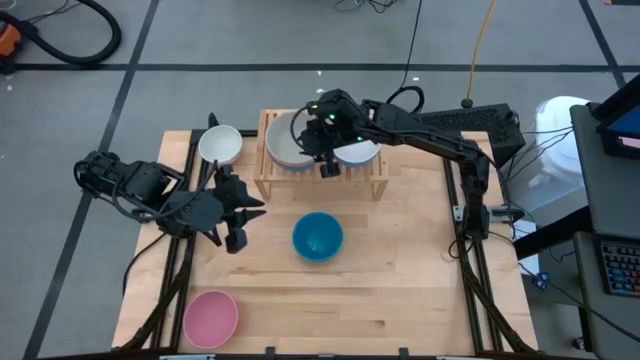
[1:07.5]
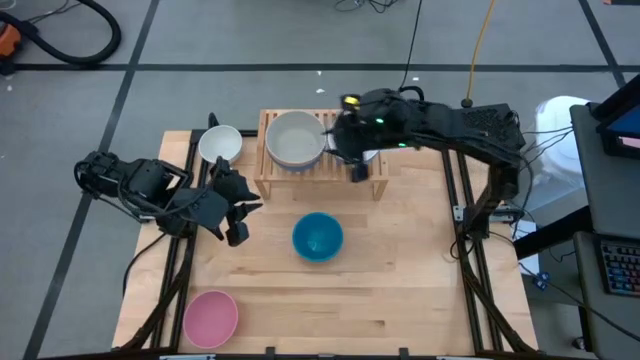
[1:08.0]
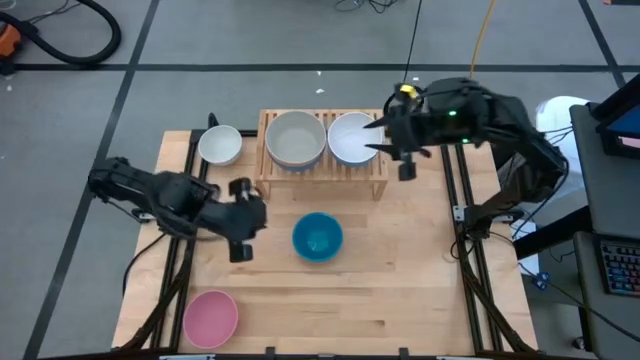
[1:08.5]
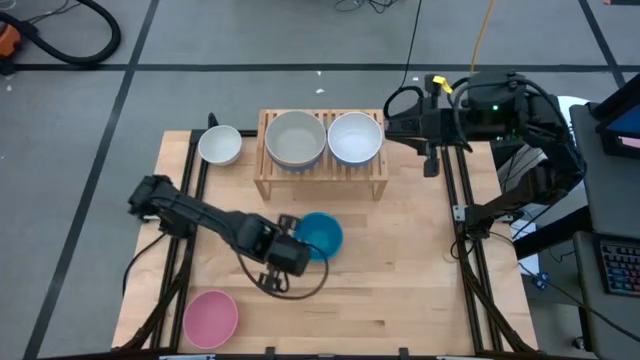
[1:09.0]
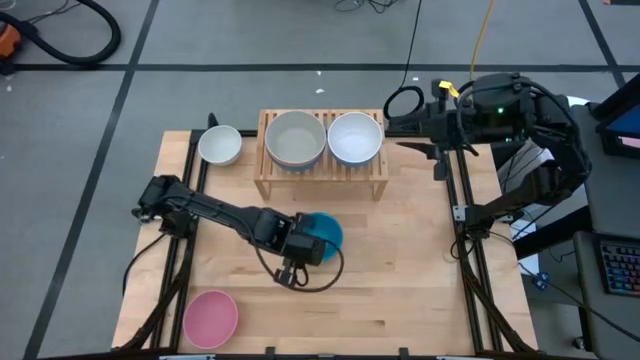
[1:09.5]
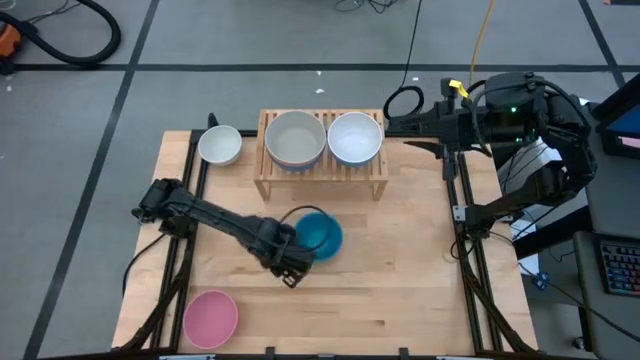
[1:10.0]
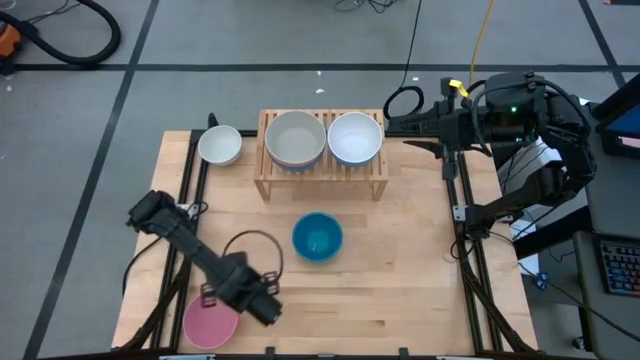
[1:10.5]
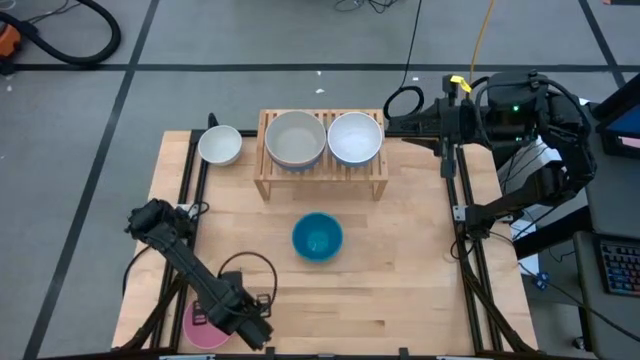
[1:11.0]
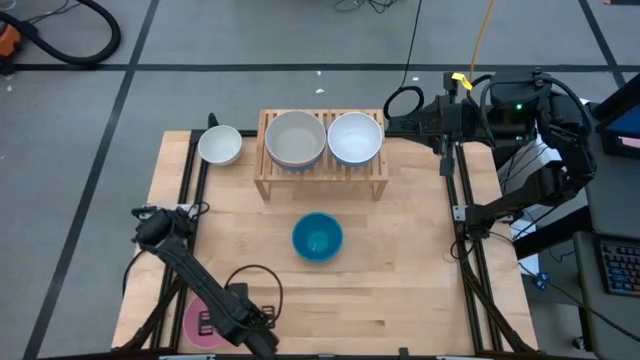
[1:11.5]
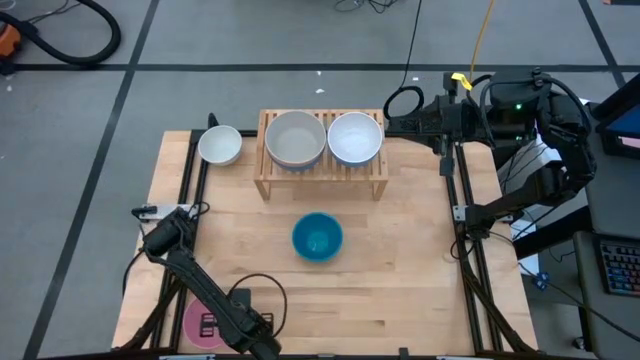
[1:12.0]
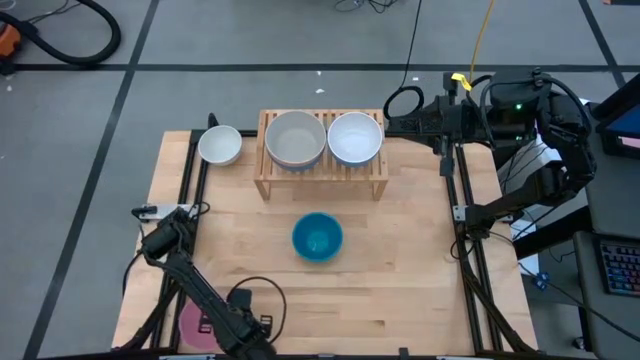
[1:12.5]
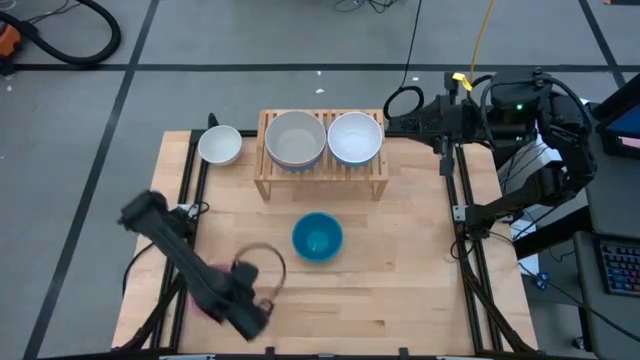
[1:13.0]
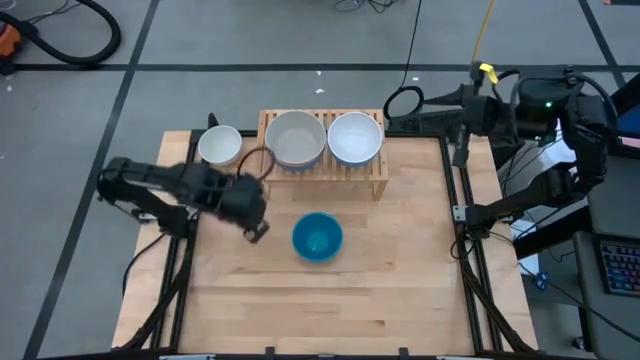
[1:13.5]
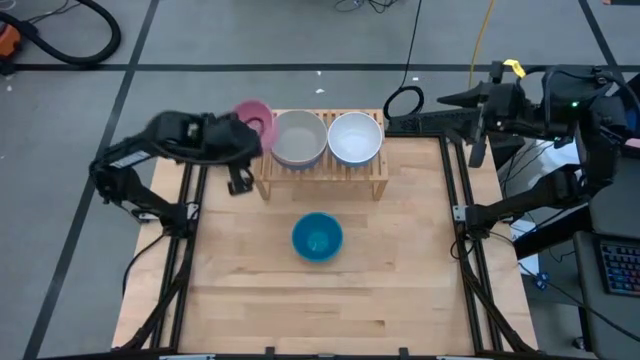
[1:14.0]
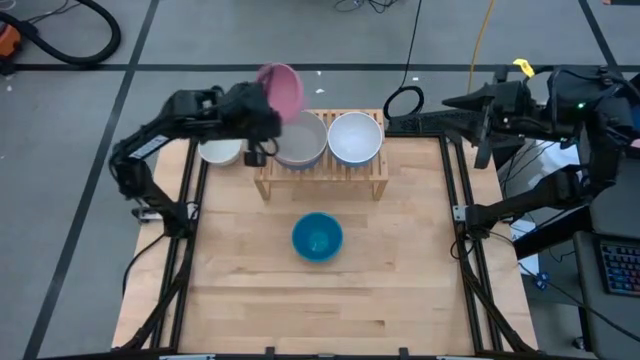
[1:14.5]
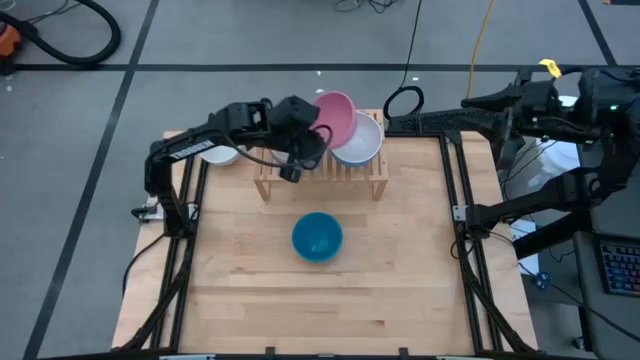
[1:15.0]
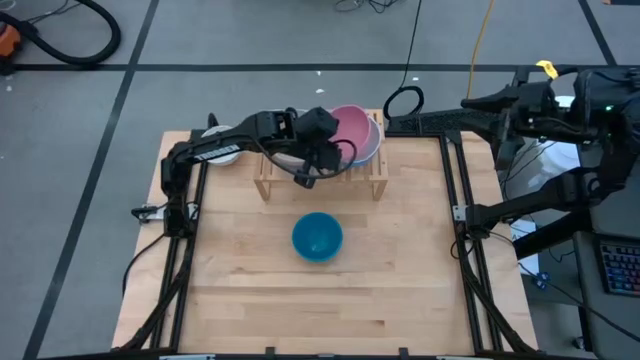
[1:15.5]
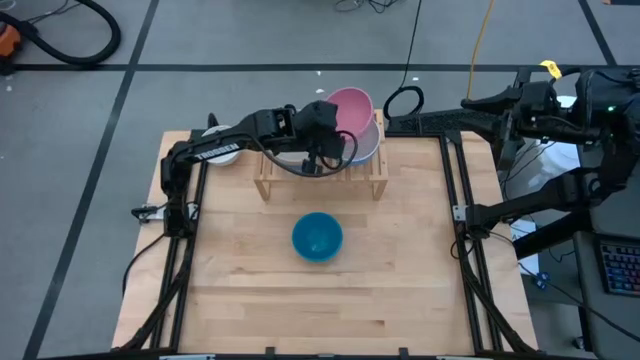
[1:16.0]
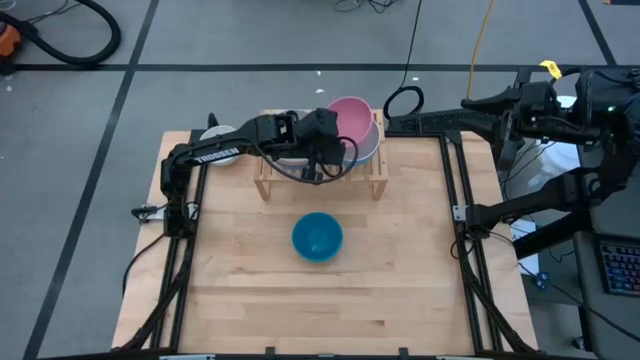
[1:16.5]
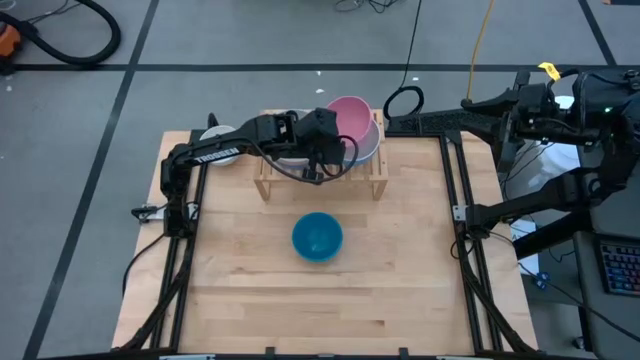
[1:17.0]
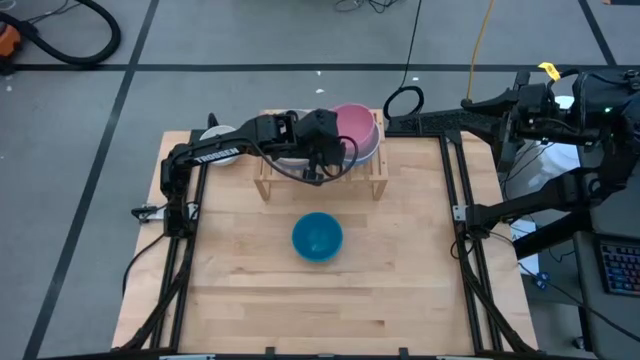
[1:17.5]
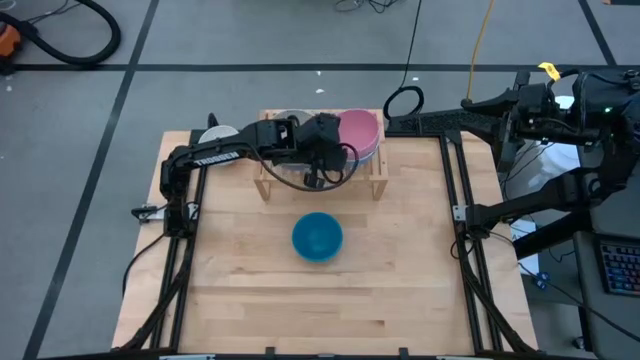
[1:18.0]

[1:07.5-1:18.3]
Task: Place and stack bowls onto a shelf
Stack the pink bowl on top of the white bowl on the shelf

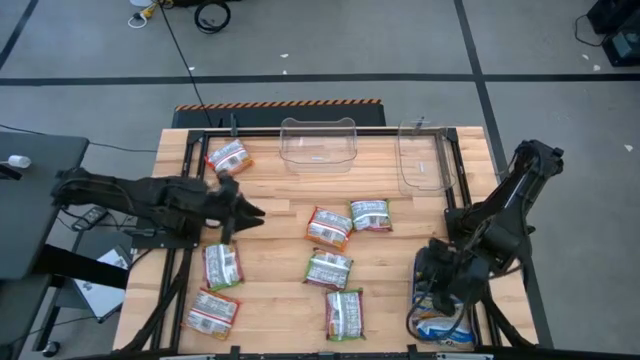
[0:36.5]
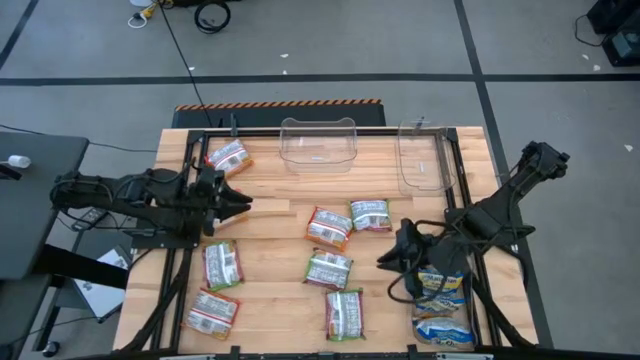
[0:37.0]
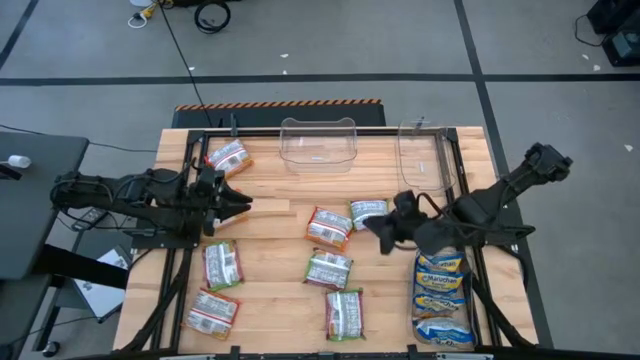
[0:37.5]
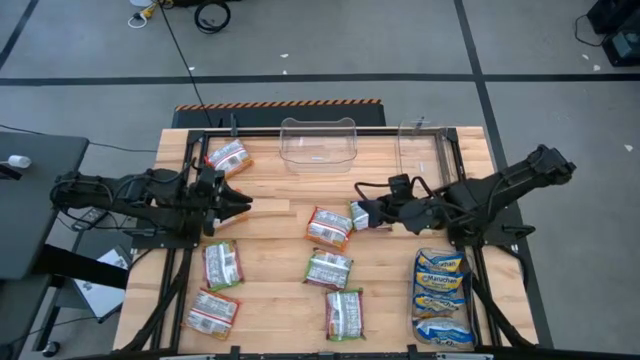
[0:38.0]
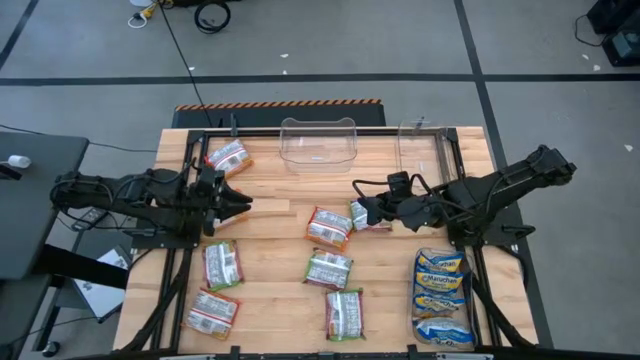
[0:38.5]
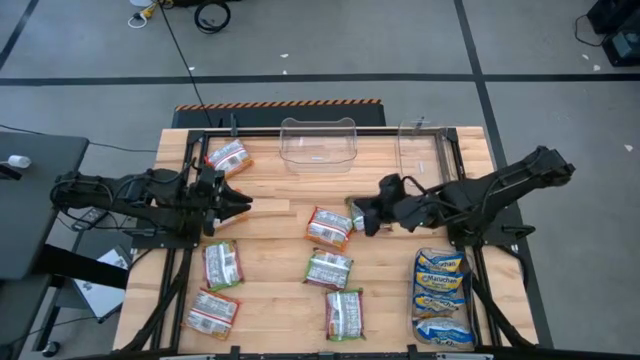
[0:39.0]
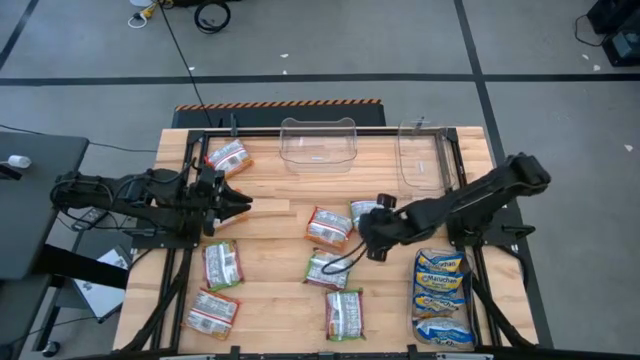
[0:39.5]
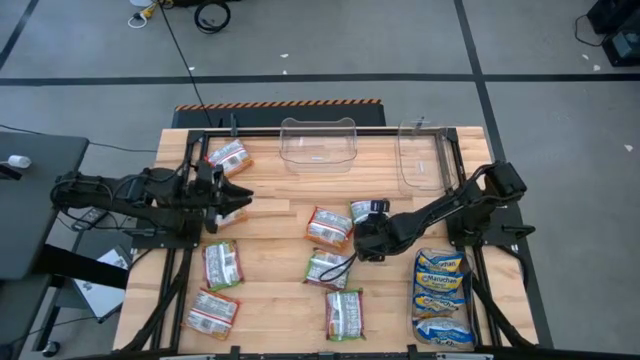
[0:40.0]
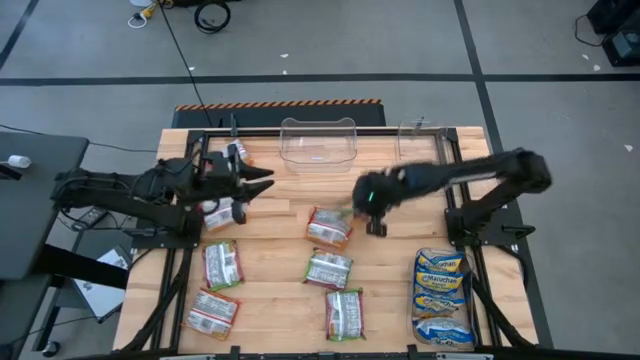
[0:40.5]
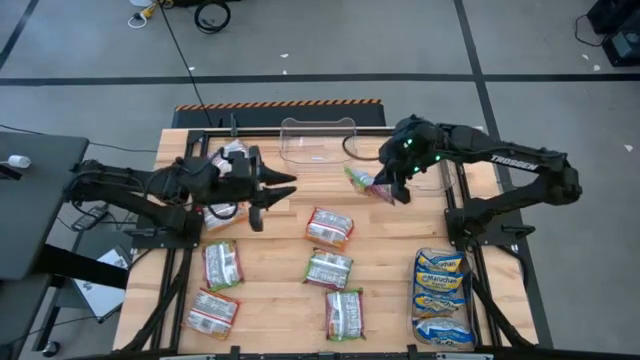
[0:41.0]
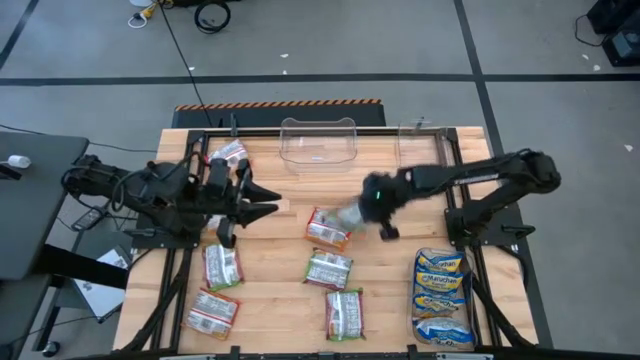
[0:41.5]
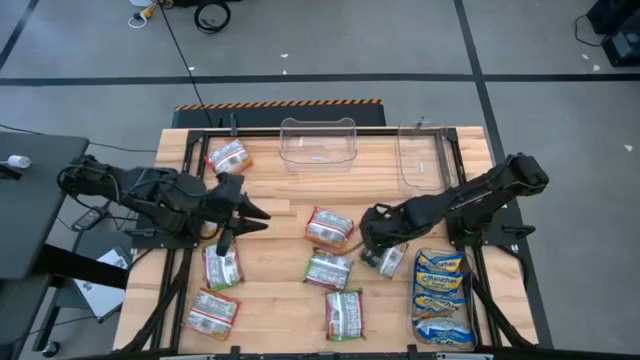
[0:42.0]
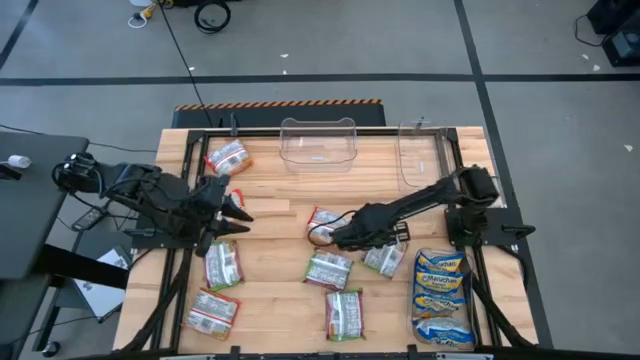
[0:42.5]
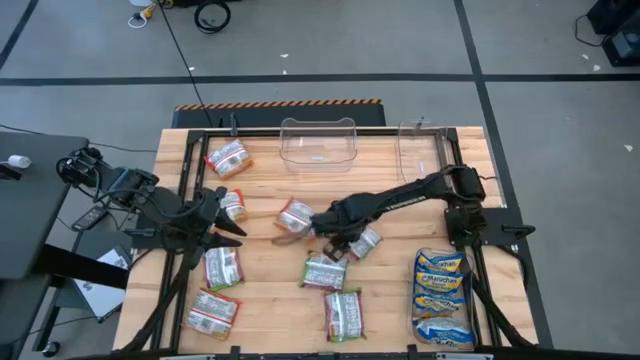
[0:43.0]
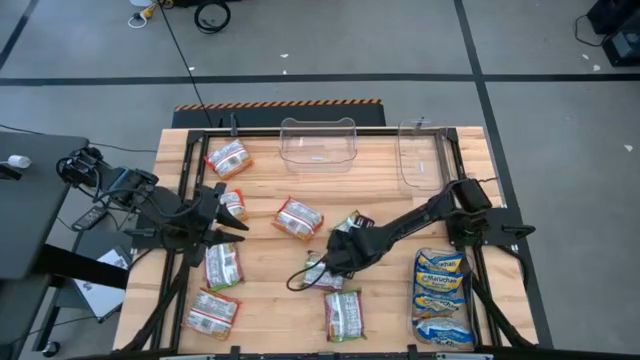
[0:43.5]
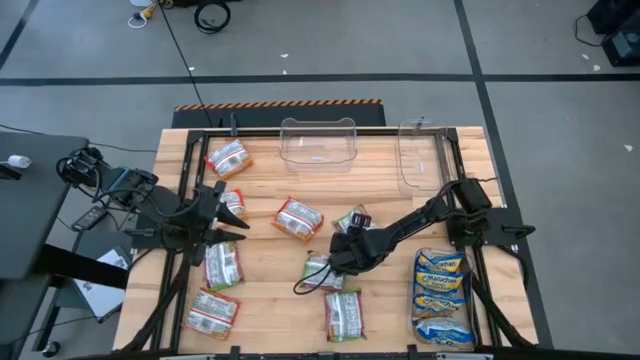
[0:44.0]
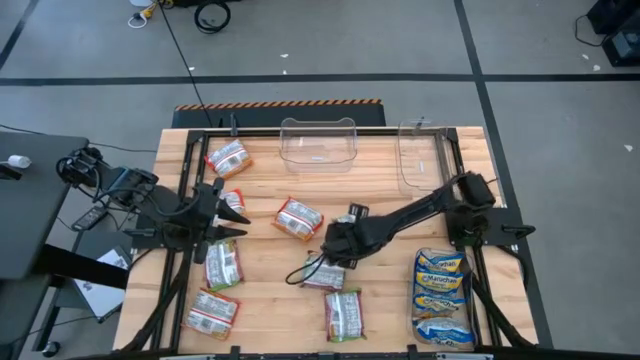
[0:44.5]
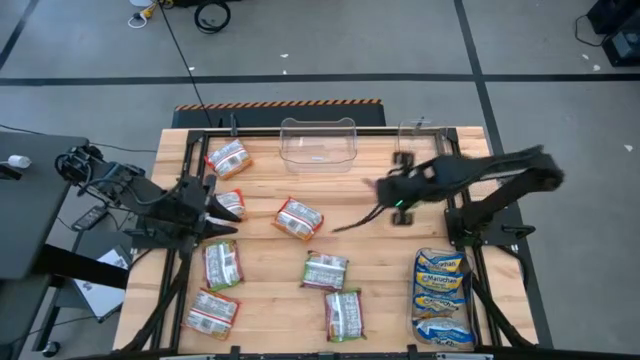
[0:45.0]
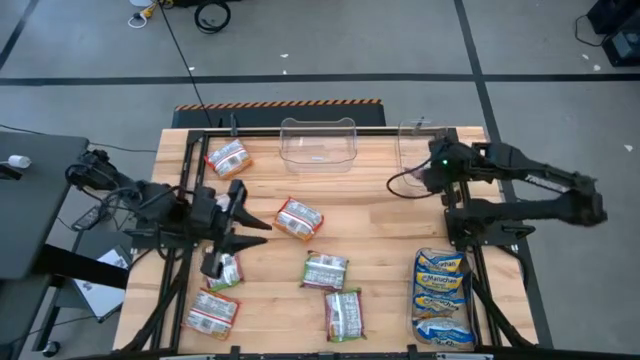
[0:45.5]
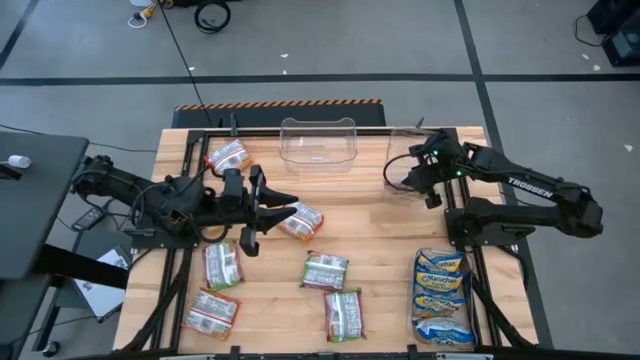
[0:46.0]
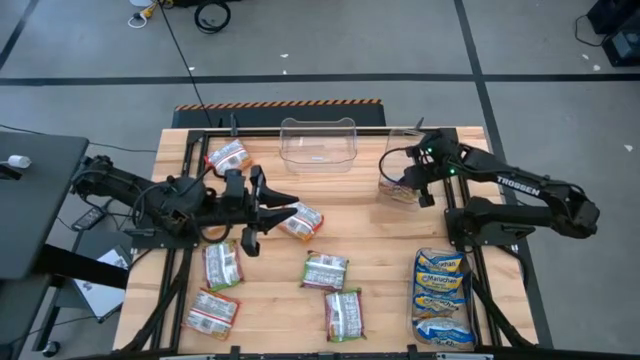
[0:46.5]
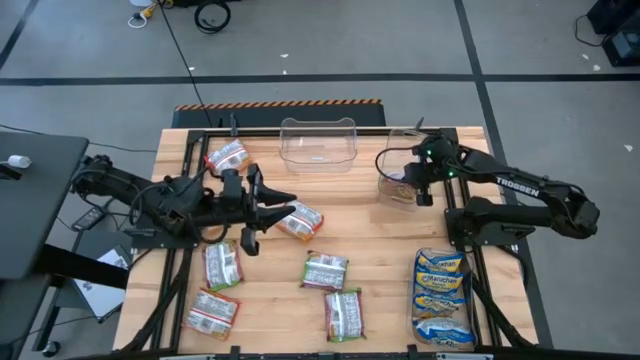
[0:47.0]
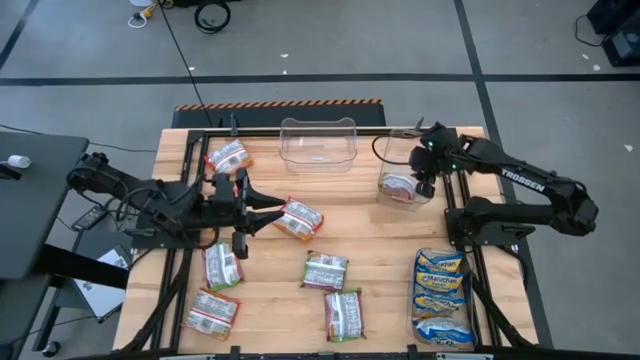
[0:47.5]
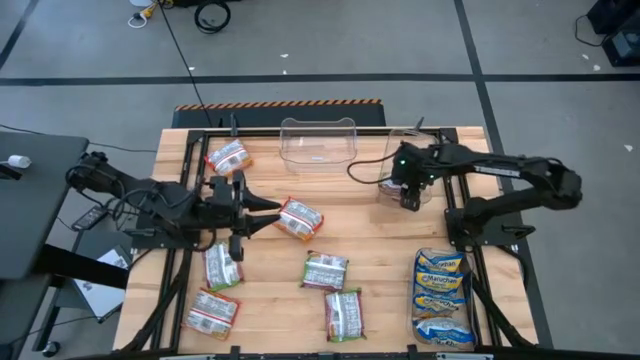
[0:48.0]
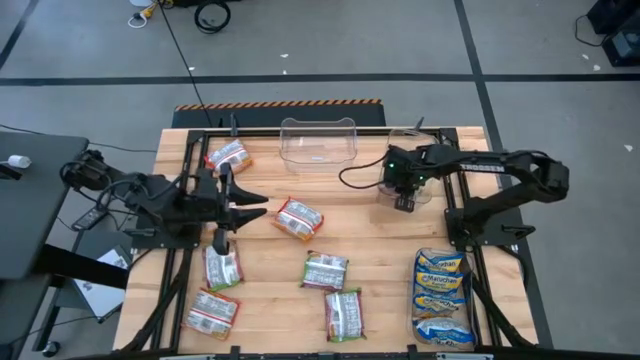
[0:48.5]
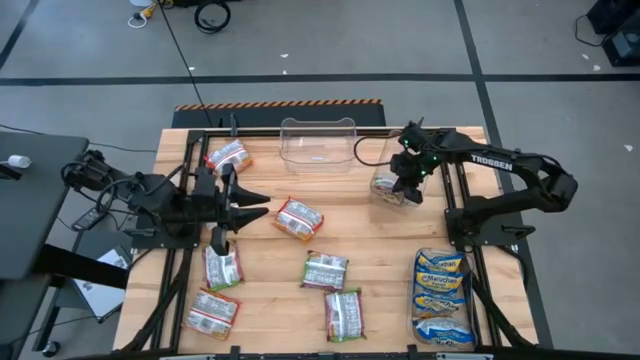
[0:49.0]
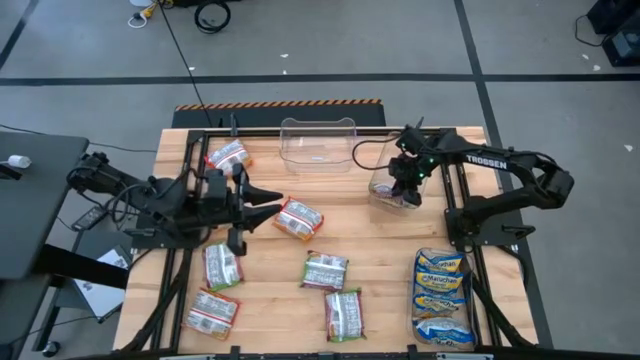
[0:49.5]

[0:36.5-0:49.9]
Task: Sort Maruchan noodles
Put the top red noodle pack into the top right transparent bin
